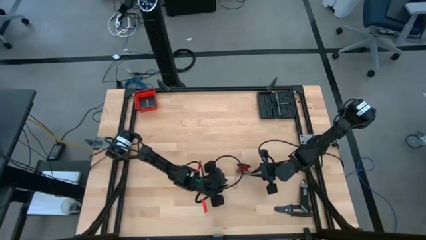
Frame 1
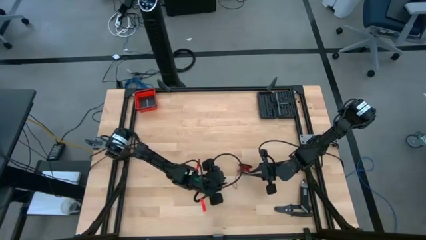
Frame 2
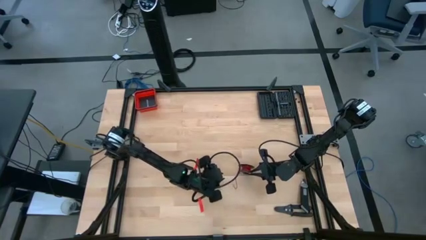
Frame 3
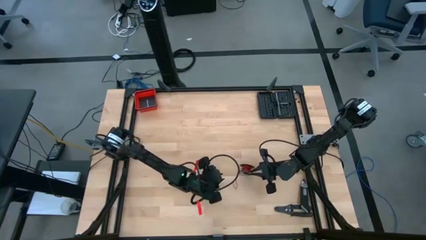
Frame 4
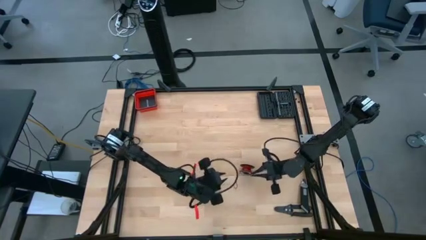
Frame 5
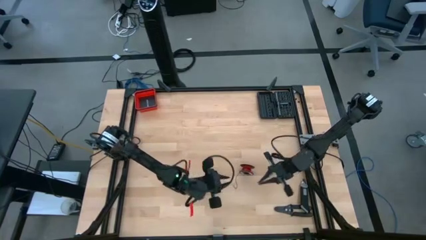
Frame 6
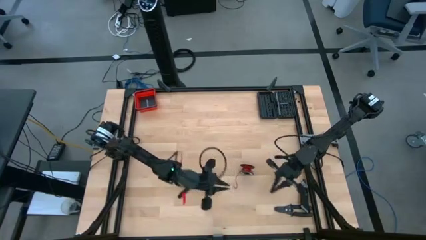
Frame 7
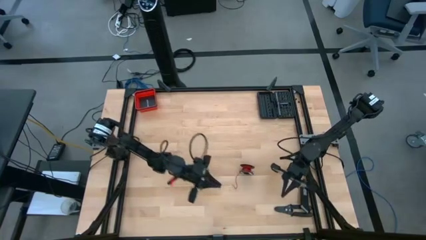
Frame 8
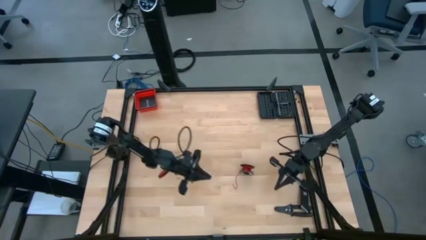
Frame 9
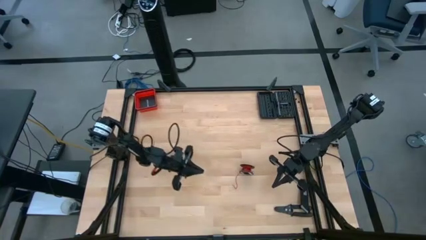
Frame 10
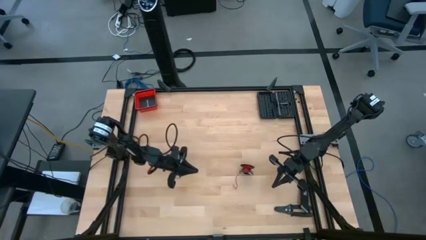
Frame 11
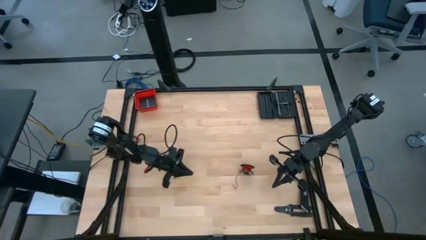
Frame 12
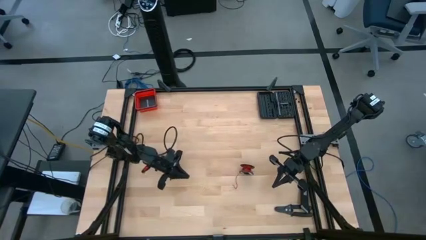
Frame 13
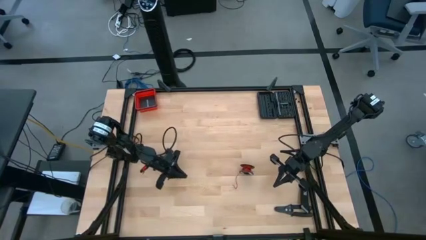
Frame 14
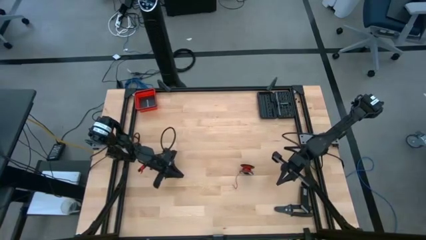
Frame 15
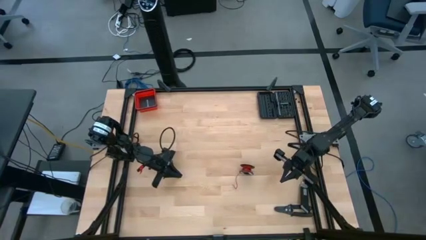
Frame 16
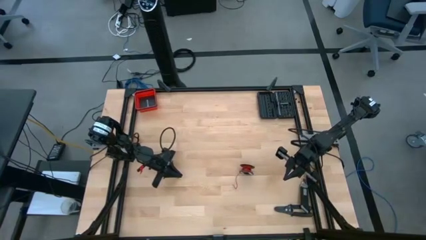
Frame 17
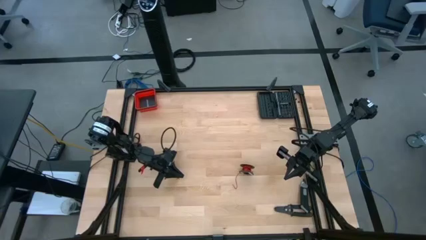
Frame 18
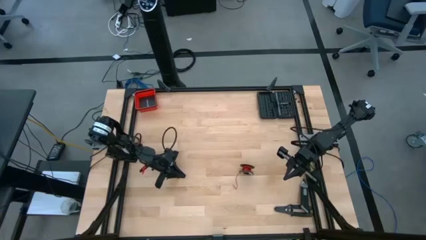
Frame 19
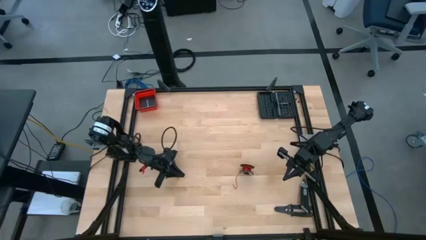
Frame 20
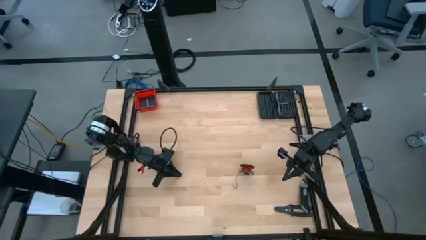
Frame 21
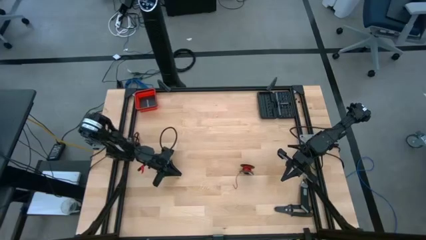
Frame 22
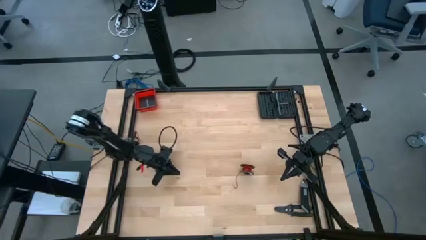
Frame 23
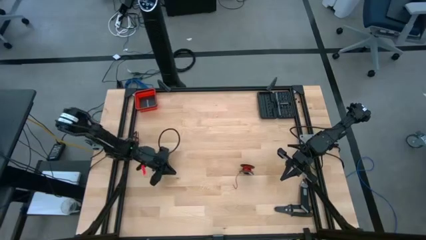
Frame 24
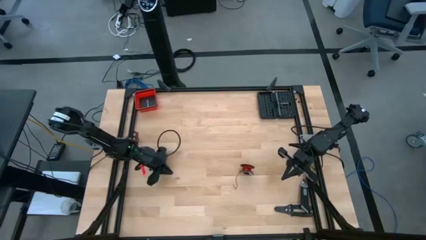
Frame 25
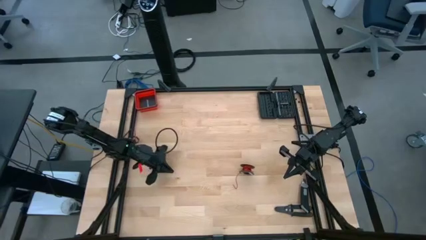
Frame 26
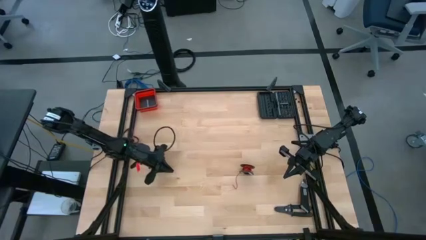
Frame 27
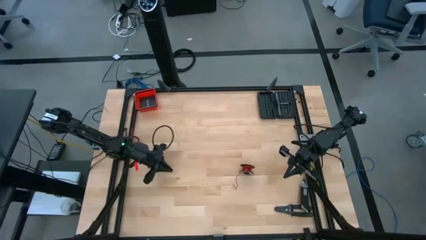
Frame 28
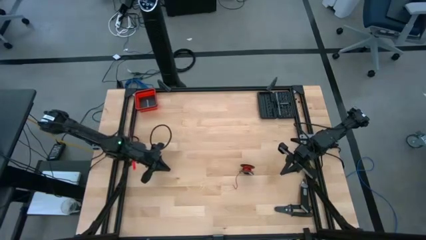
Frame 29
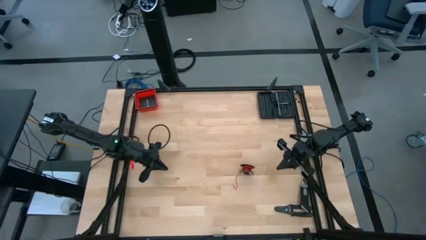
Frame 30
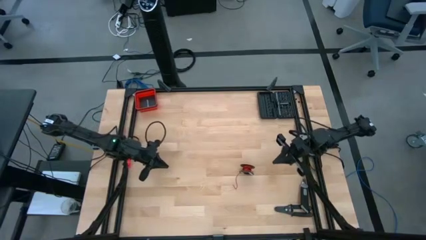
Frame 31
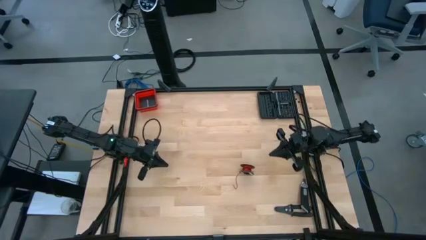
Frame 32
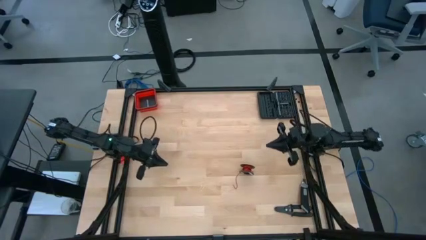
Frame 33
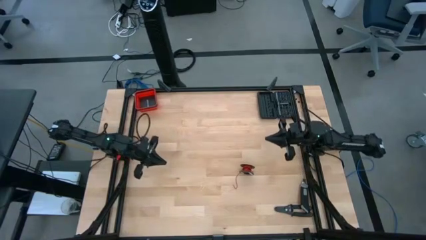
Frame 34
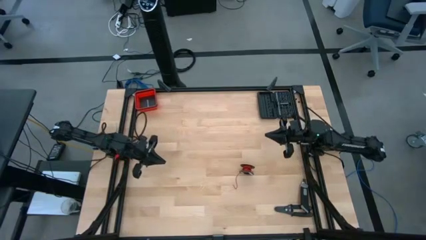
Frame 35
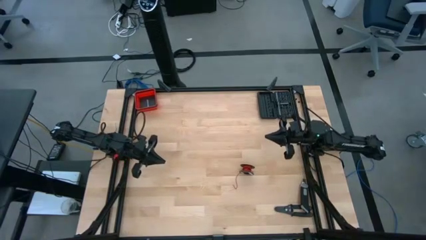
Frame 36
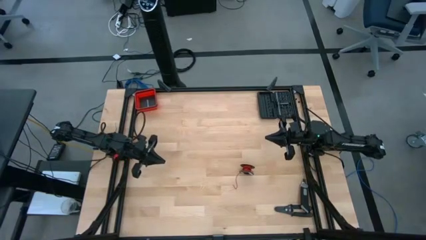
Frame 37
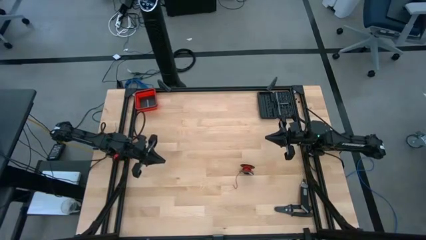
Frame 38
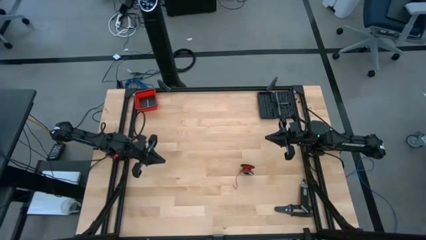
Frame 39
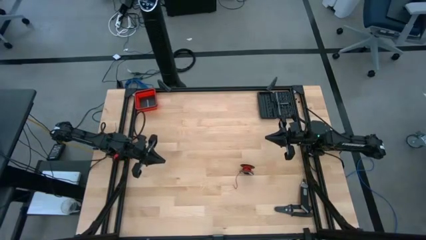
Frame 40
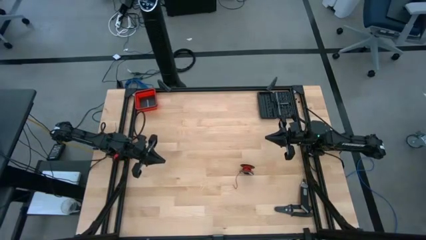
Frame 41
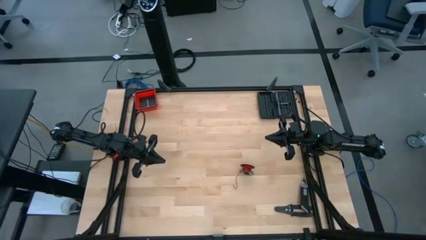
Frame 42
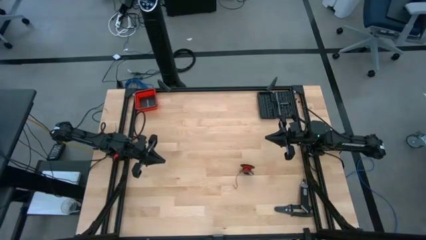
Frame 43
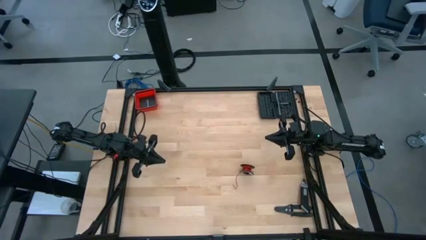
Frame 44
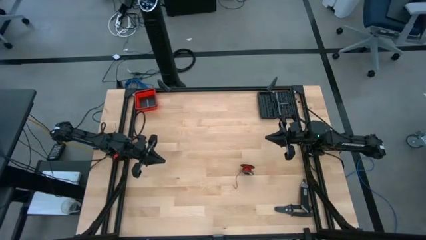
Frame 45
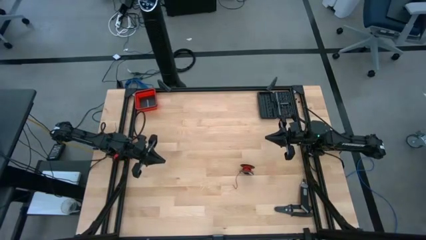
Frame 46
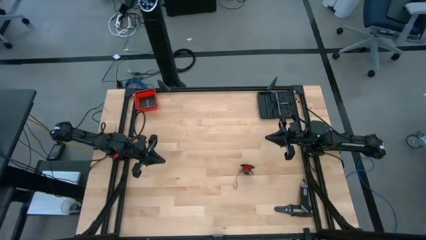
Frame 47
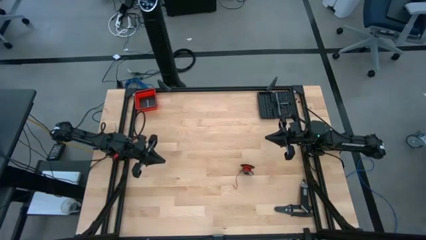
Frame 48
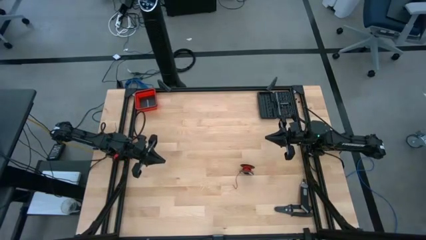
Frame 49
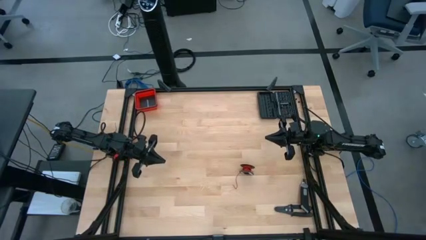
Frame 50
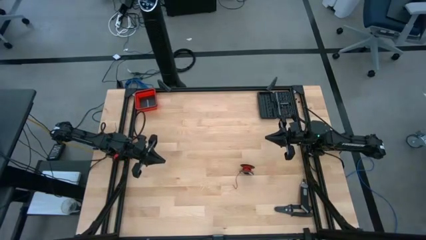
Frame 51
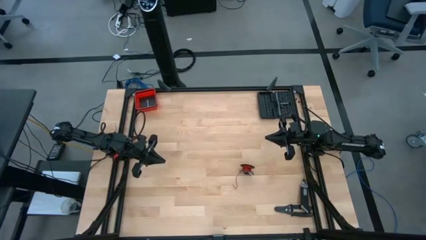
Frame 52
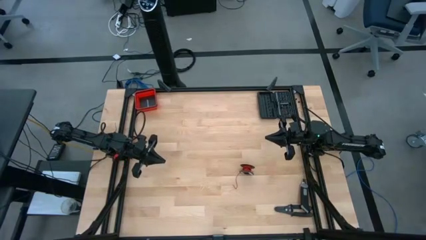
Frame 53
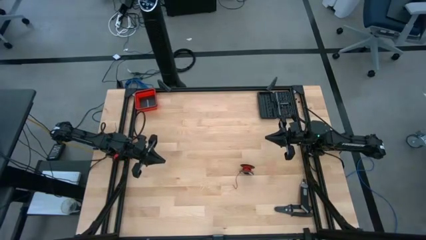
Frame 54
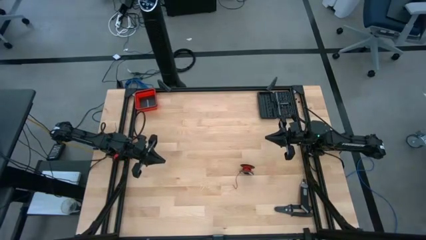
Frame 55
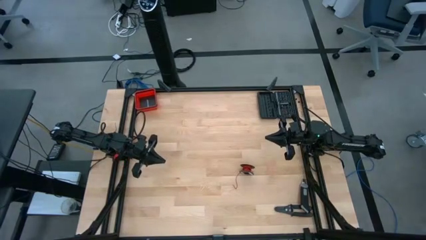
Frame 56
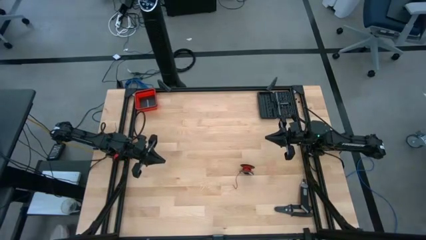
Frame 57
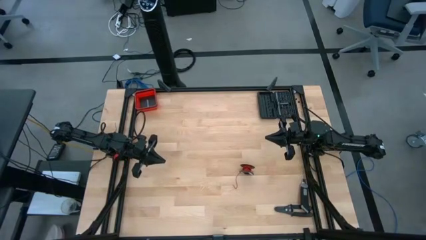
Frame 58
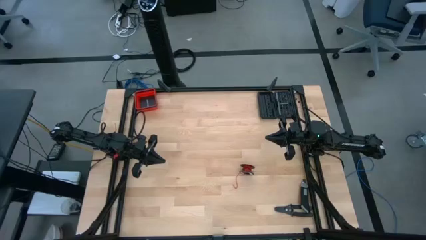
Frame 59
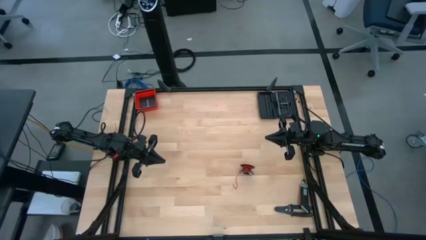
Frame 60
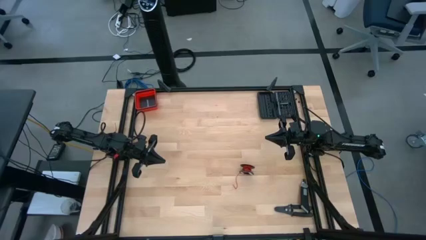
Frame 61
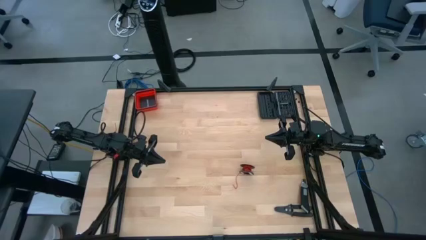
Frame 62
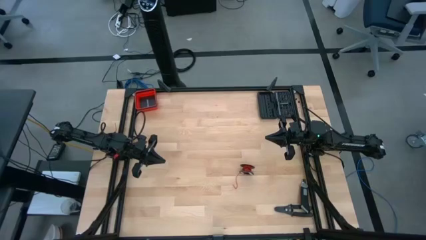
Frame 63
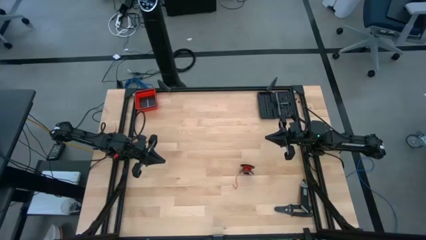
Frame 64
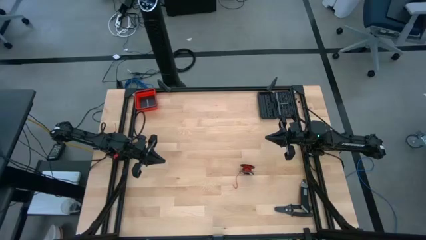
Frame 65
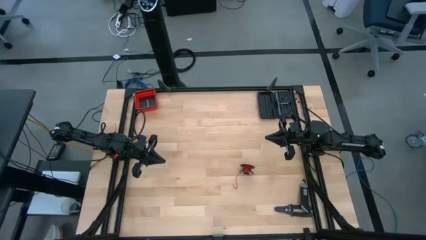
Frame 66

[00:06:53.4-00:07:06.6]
Task: Coil cords
Return to Home Position

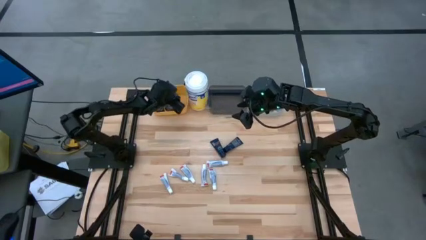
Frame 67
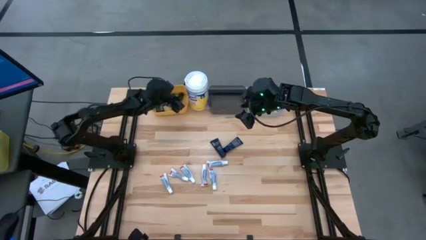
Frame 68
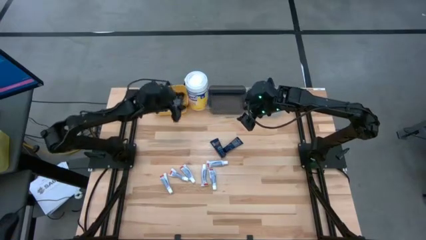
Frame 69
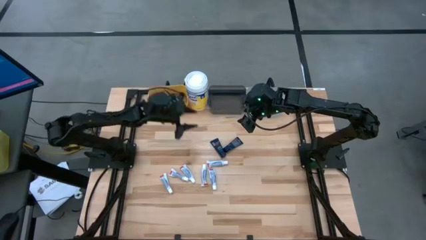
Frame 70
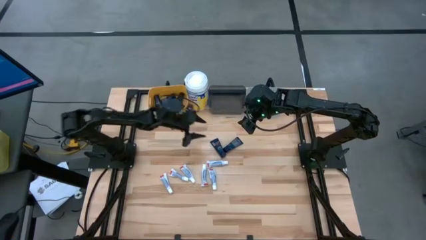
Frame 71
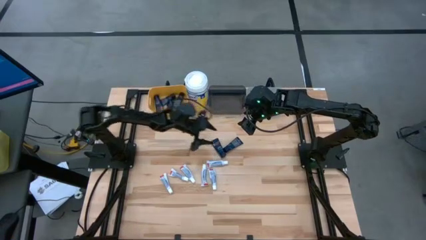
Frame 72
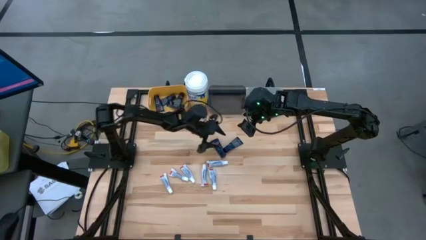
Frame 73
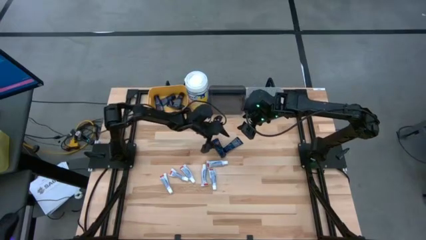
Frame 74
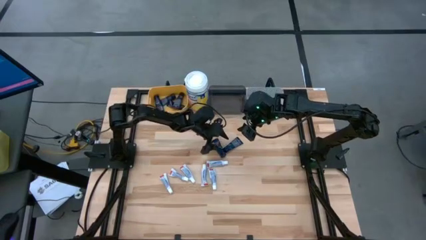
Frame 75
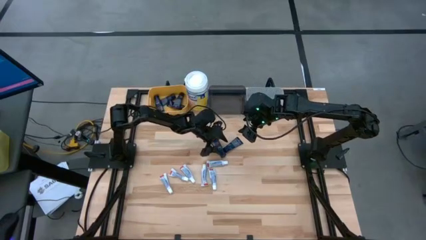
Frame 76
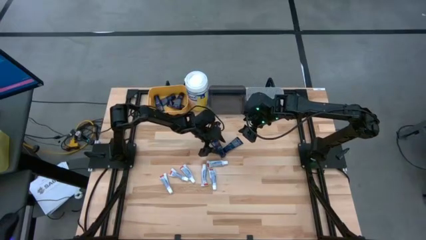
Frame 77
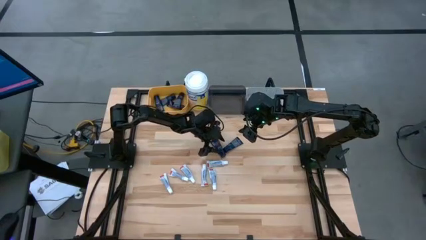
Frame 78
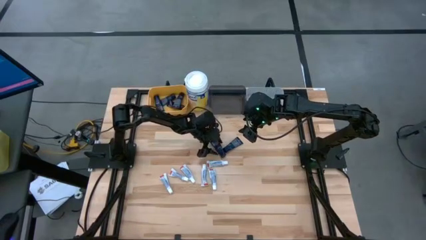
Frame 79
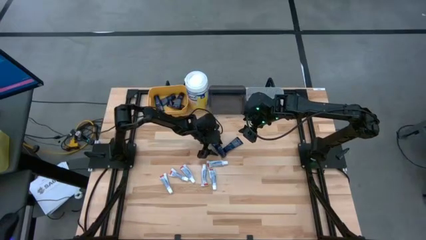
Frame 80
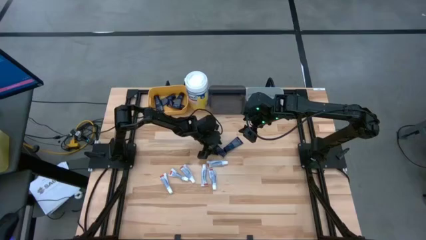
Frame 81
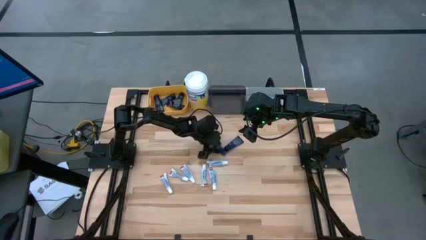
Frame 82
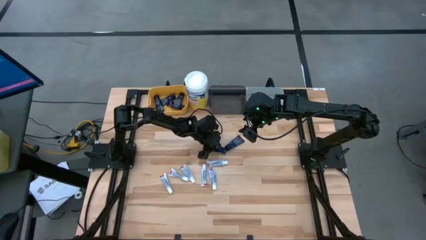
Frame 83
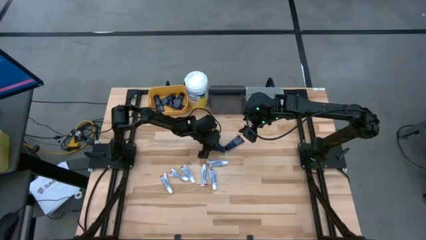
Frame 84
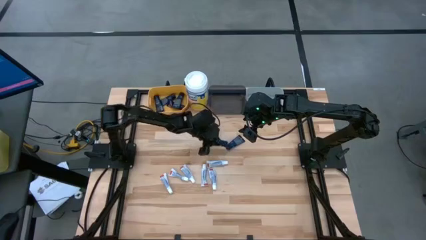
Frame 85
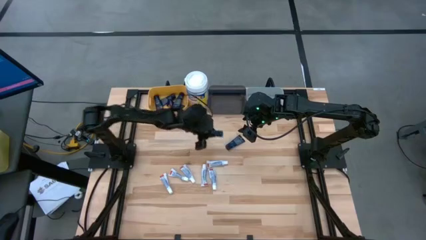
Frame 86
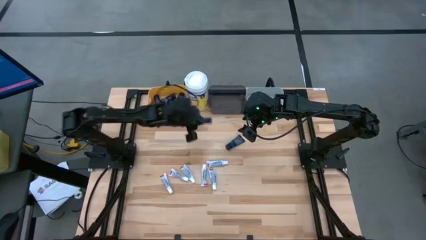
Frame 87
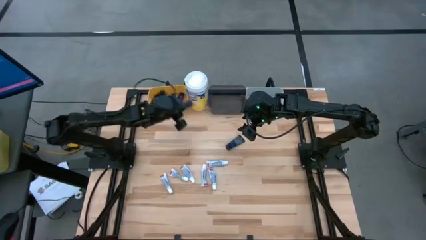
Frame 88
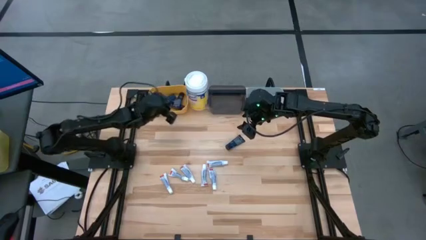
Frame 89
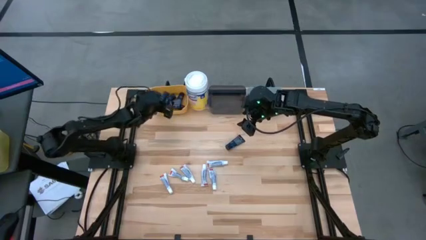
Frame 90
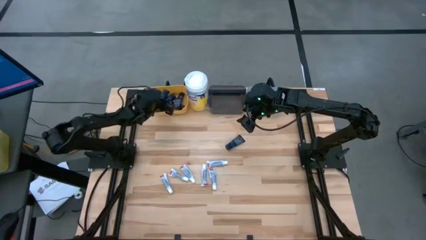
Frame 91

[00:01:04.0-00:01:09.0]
Task: Pick & Place Travel size toiletries
Put the blue shave cream into the yellow bin
